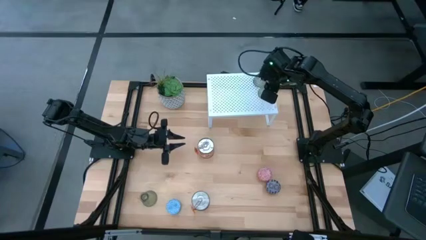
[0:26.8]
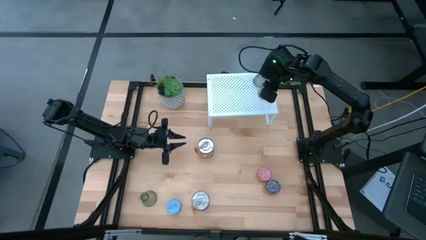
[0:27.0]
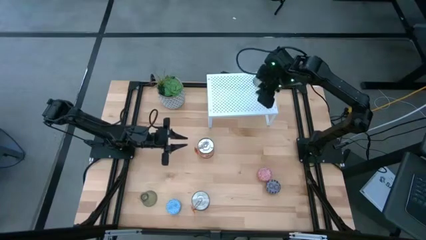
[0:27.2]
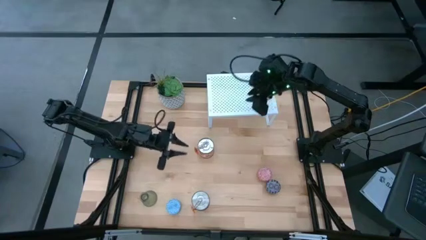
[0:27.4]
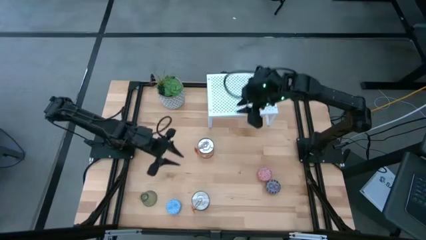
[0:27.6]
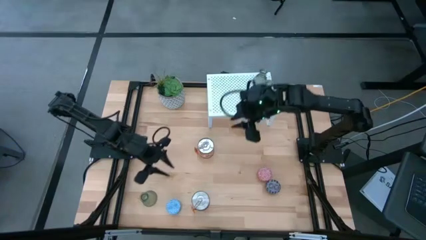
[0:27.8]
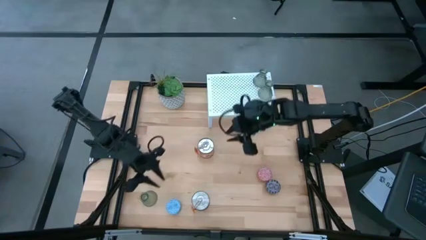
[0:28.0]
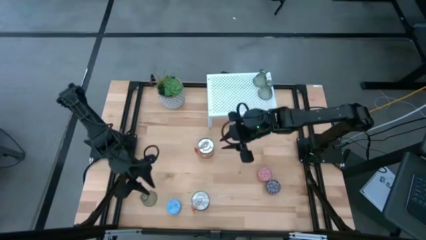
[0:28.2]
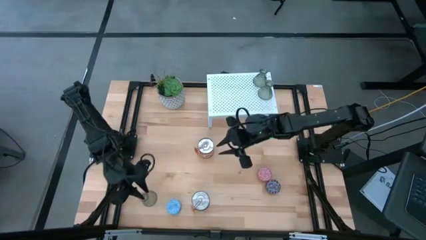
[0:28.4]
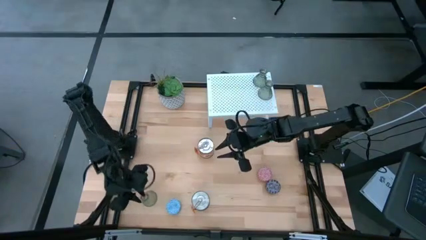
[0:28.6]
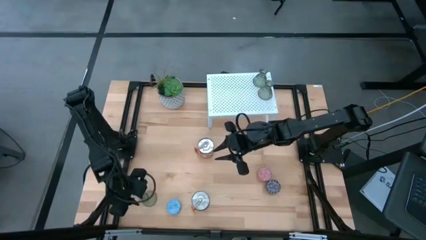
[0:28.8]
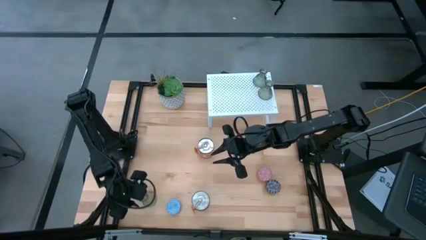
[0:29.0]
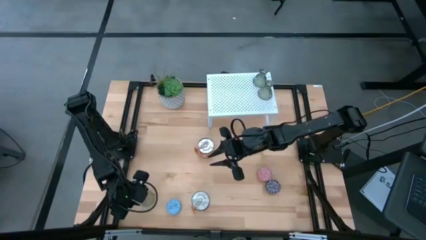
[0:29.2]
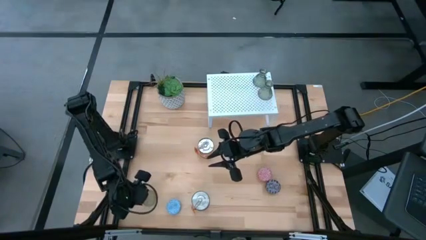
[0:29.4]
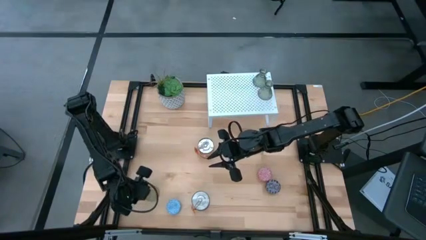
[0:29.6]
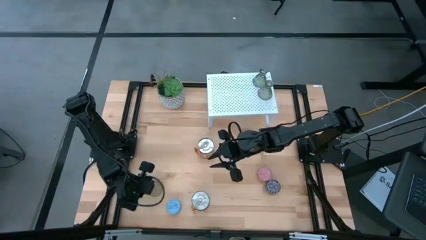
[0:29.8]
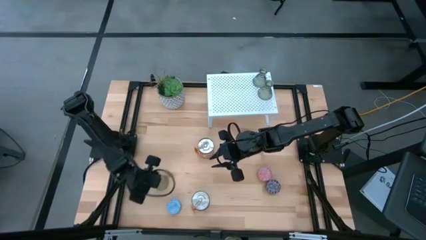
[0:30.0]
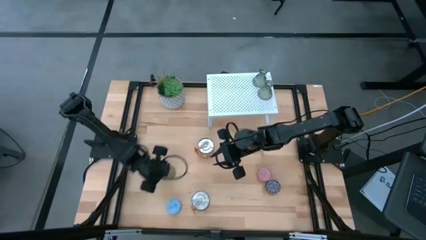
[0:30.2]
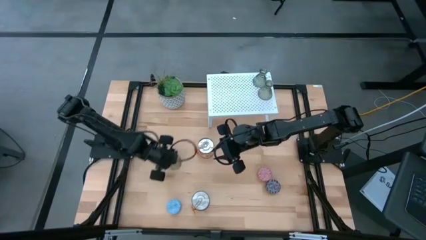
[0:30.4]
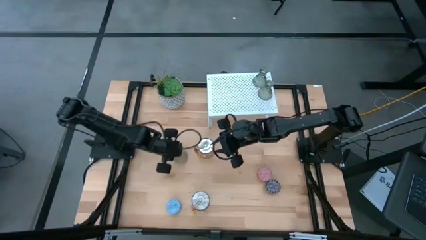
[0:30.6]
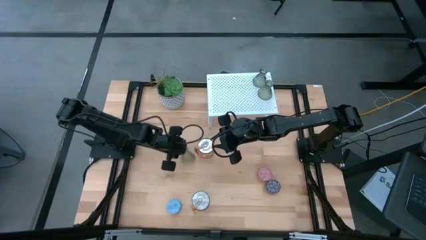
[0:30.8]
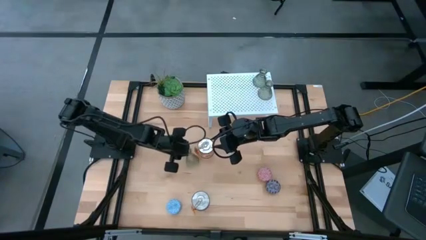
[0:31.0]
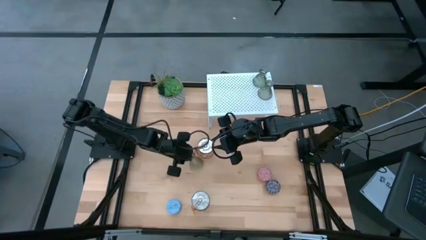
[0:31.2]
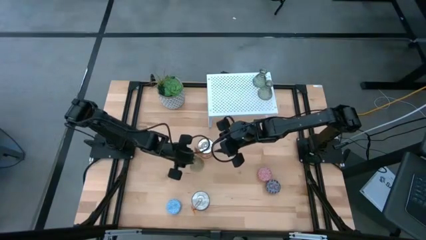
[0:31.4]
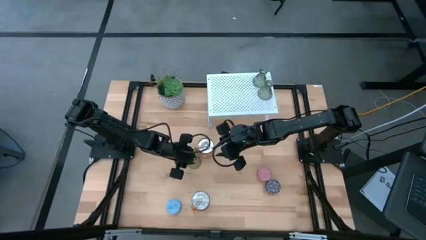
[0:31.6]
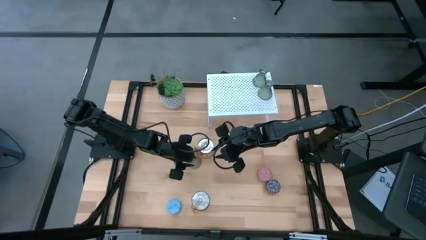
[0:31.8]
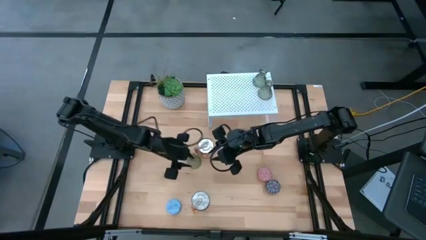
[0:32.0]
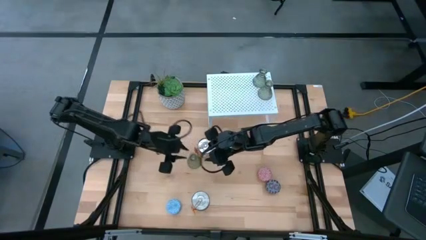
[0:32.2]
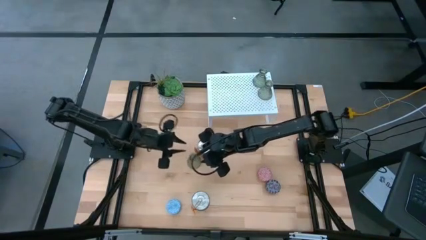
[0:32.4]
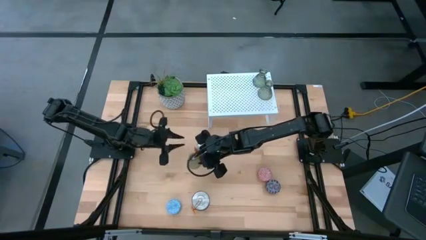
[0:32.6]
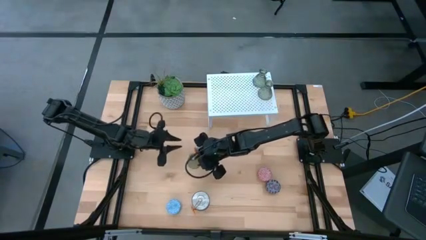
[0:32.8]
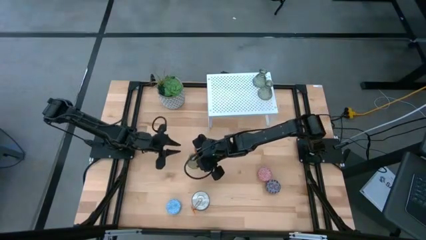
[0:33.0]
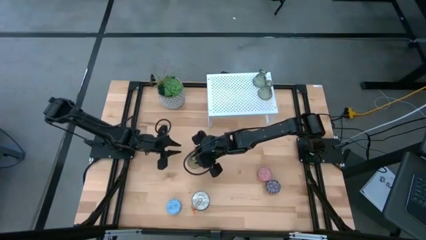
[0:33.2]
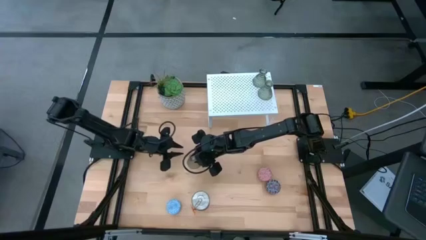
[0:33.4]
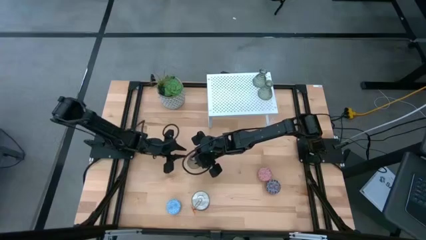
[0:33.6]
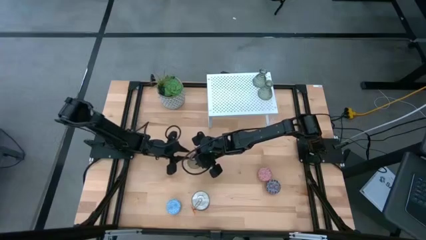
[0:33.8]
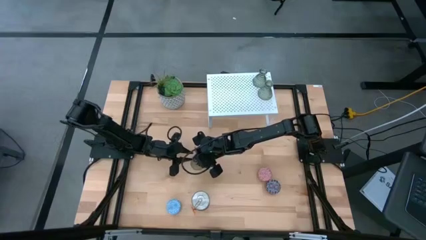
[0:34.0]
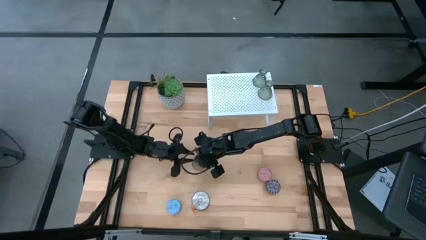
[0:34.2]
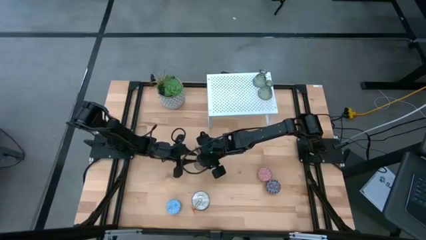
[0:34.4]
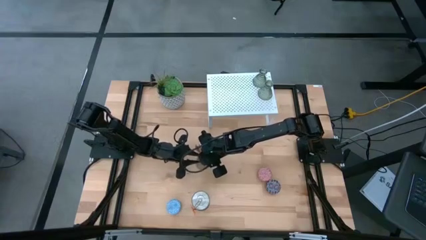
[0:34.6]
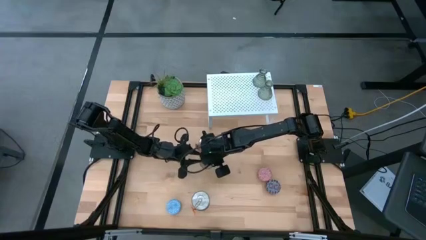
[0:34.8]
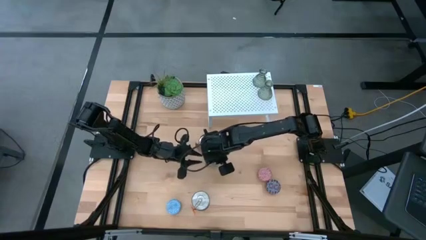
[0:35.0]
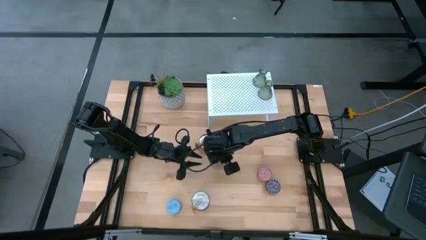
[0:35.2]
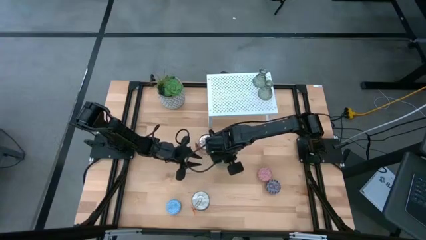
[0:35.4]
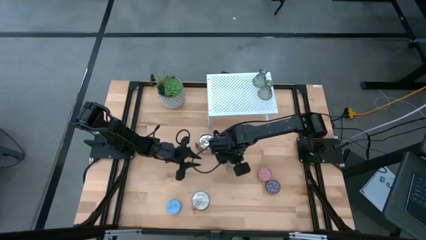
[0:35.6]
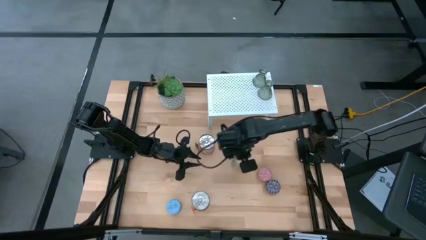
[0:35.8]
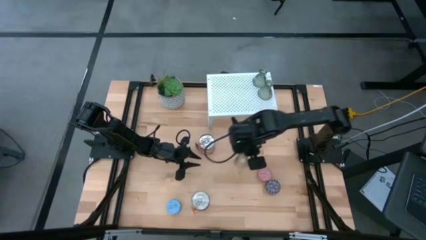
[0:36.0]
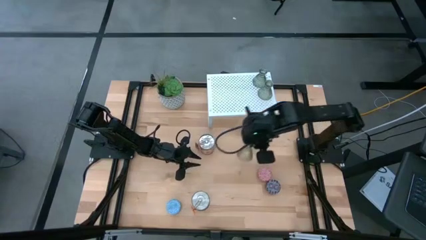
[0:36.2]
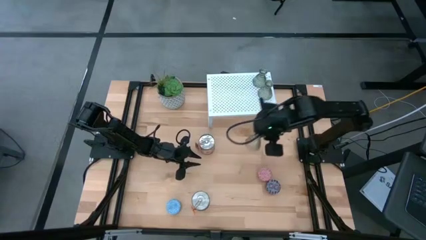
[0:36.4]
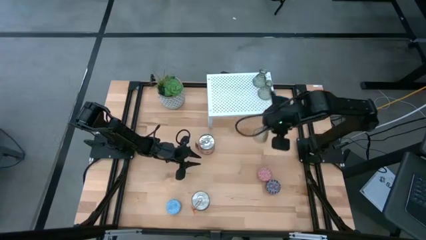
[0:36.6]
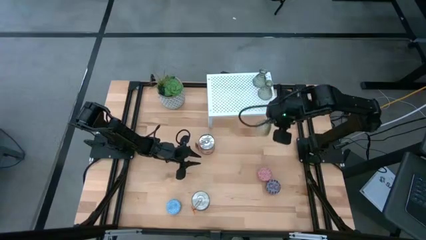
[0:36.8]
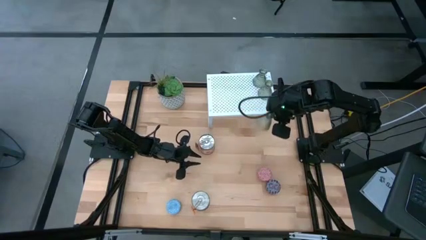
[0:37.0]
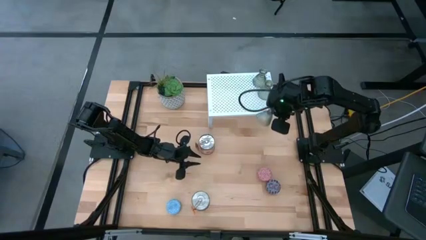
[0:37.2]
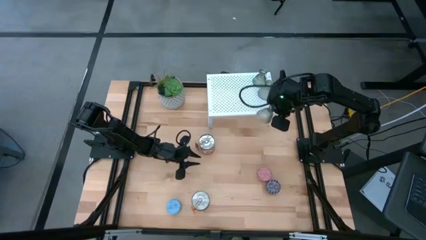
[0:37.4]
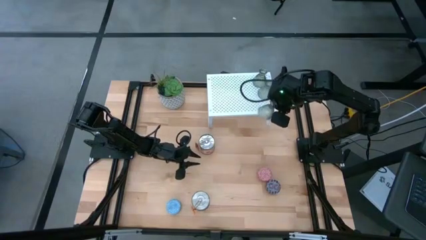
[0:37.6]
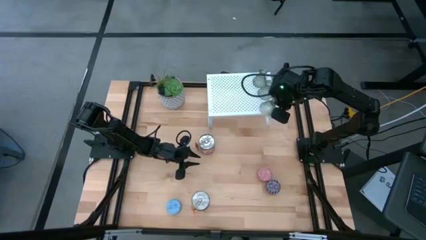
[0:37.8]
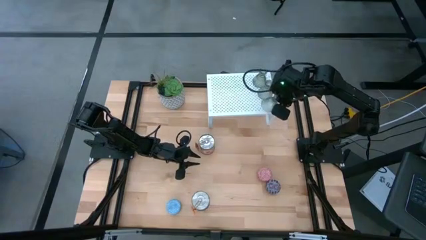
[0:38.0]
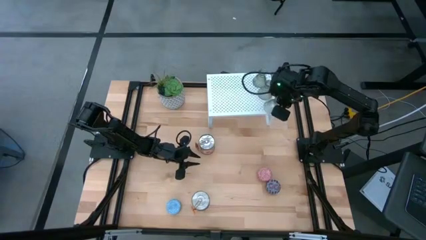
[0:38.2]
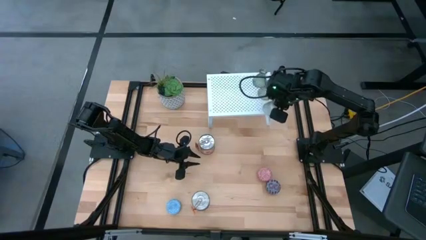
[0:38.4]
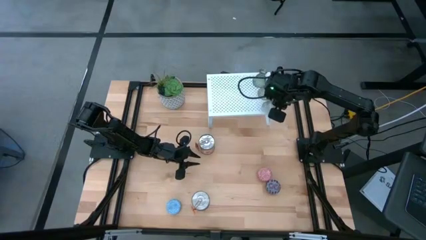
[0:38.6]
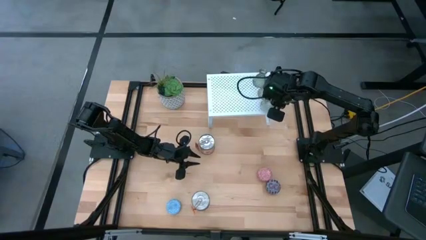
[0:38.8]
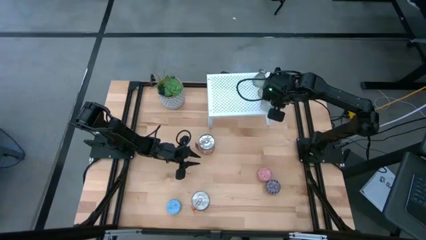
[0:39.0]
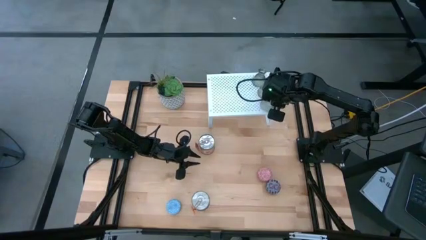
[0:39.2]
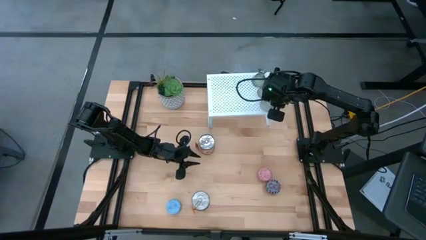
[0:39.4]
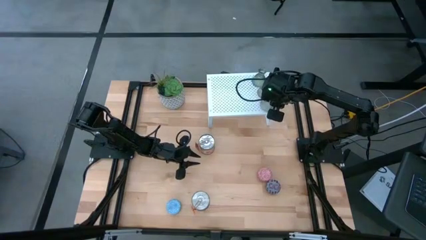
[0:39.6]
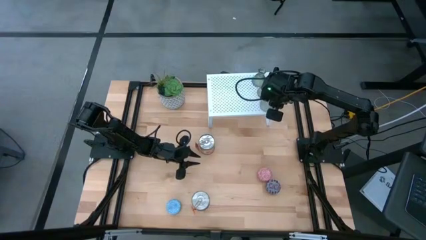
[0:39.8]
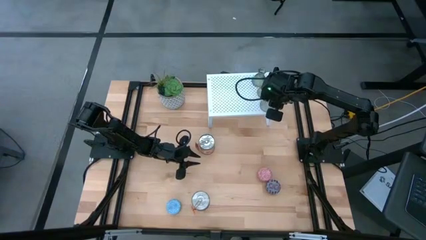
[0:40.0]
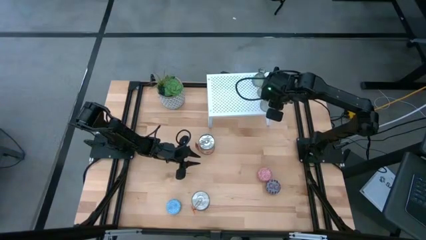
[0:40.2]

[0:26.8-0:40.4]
Task: Pick & Place candle stick holders
Put the green glass candle holder on the shelf aligned with the other glass candle holders
